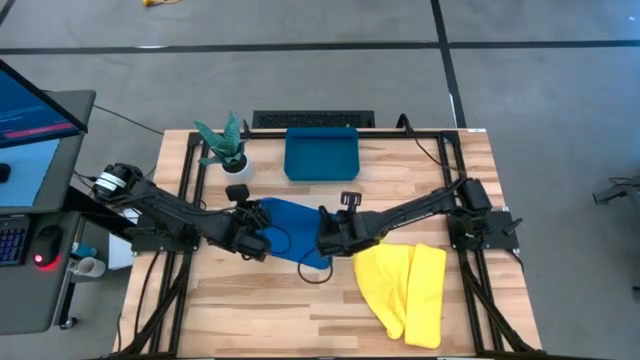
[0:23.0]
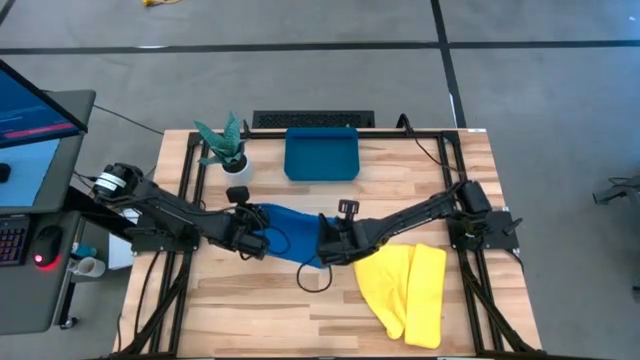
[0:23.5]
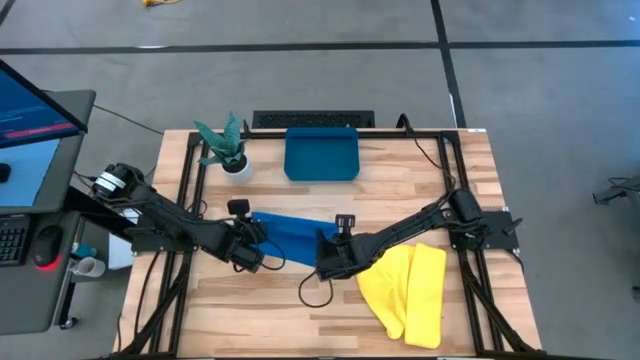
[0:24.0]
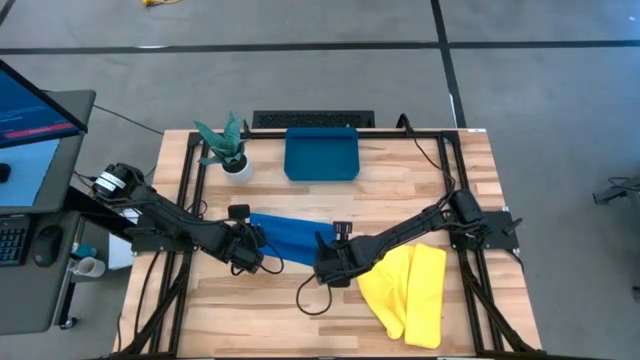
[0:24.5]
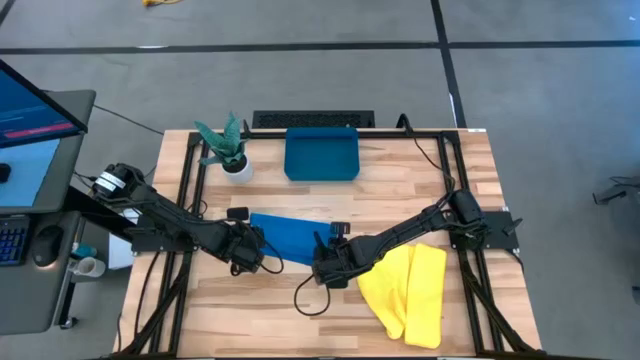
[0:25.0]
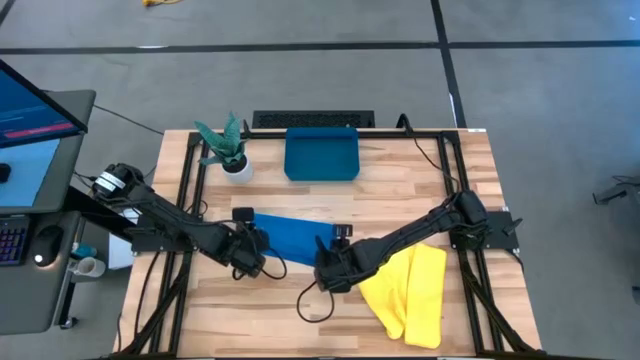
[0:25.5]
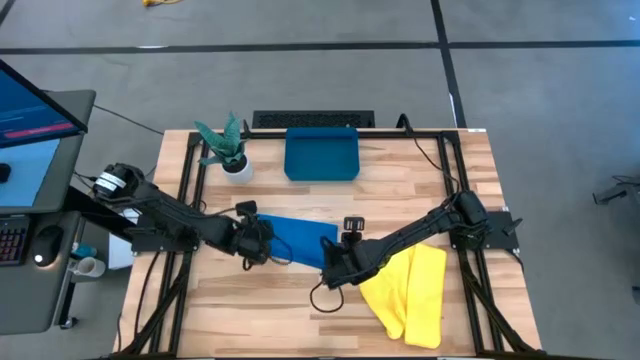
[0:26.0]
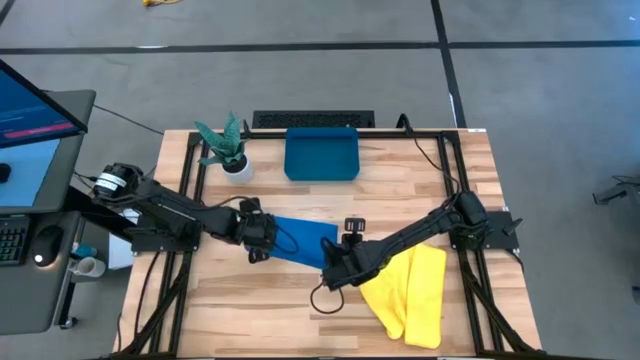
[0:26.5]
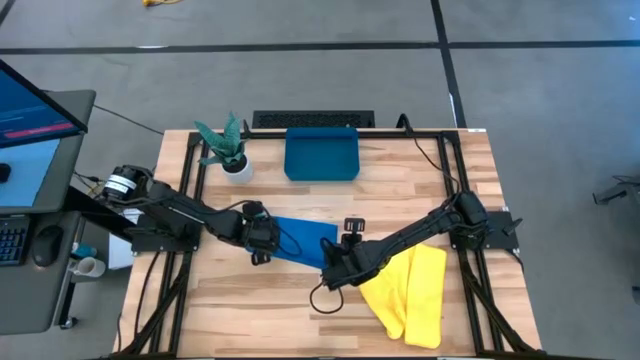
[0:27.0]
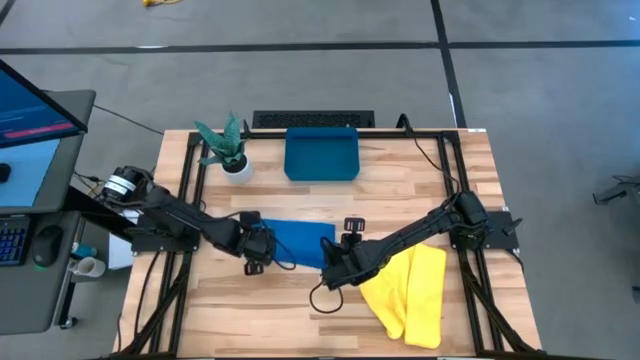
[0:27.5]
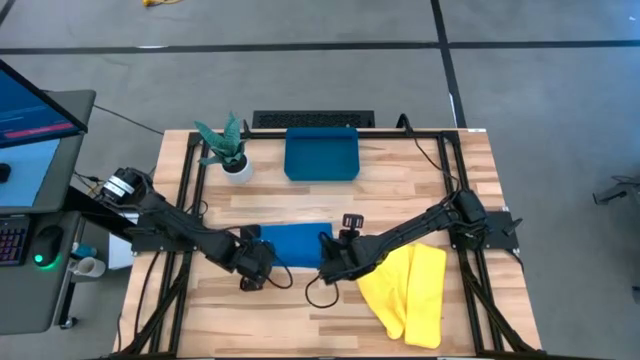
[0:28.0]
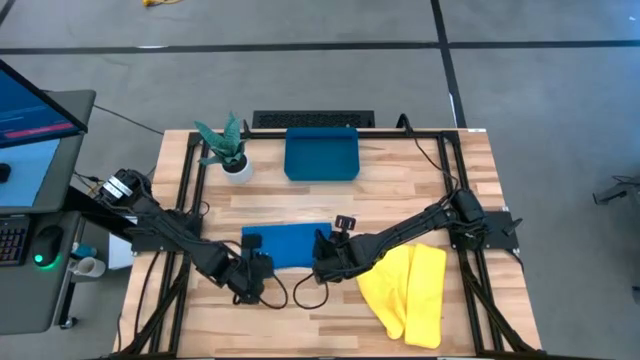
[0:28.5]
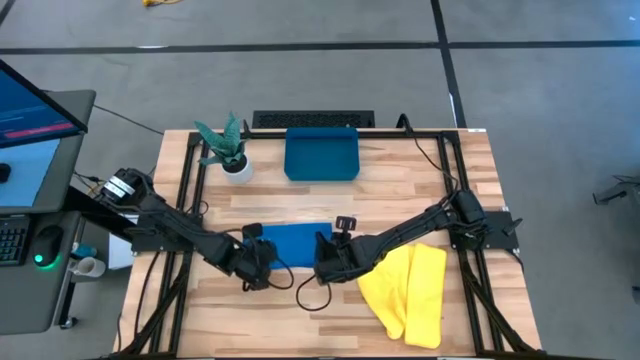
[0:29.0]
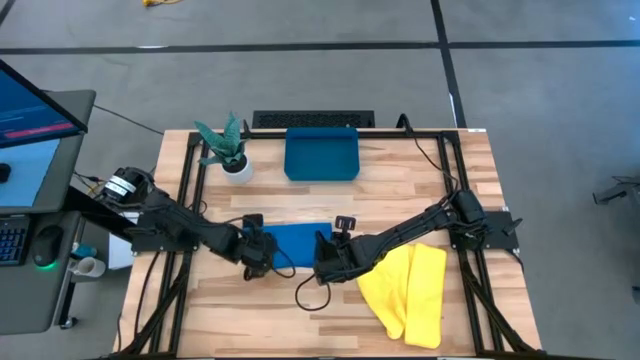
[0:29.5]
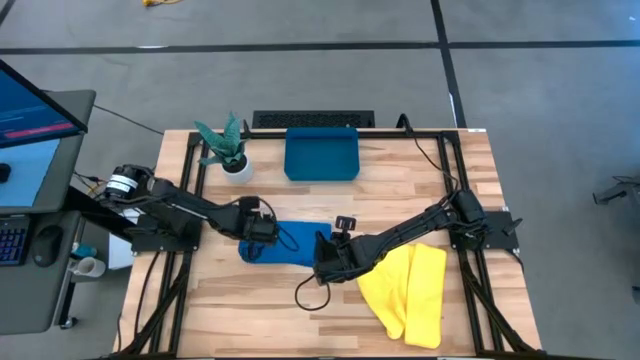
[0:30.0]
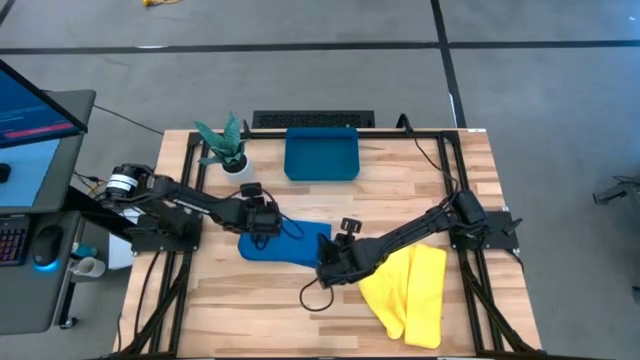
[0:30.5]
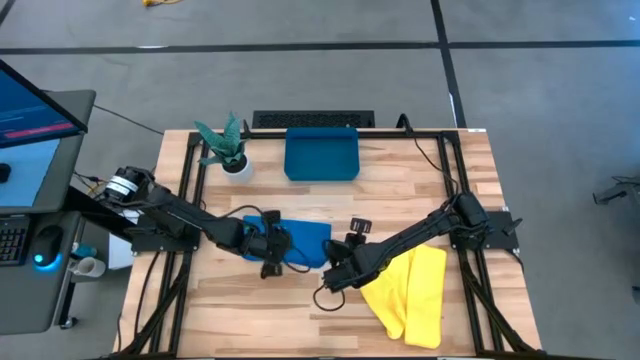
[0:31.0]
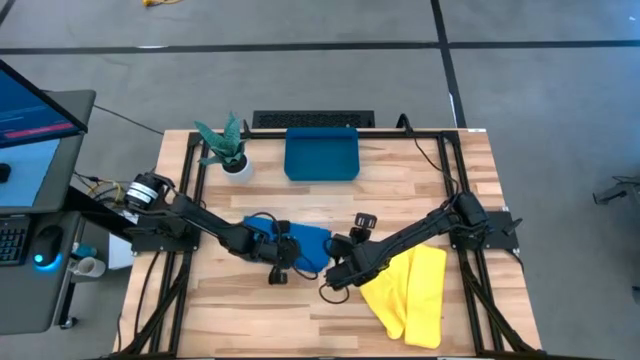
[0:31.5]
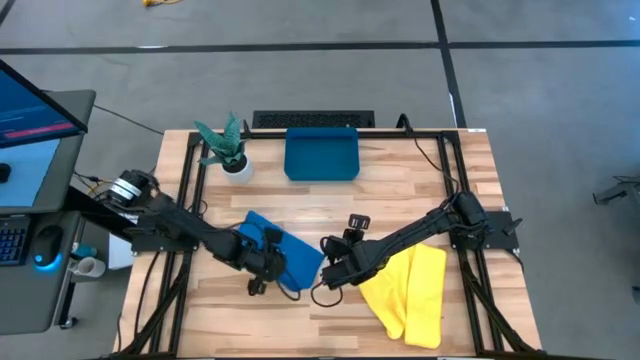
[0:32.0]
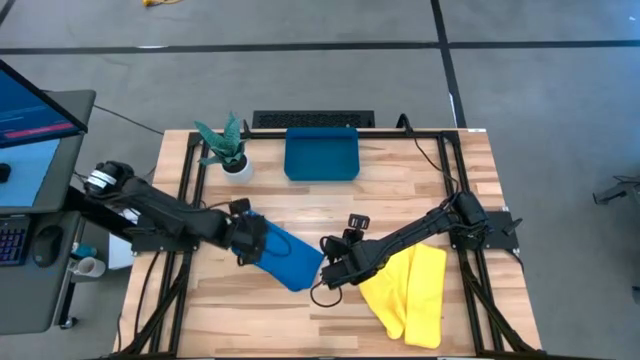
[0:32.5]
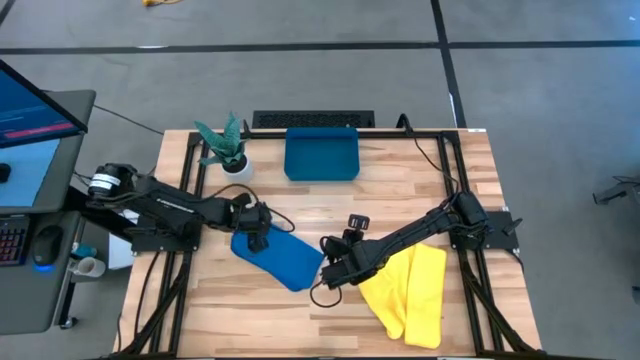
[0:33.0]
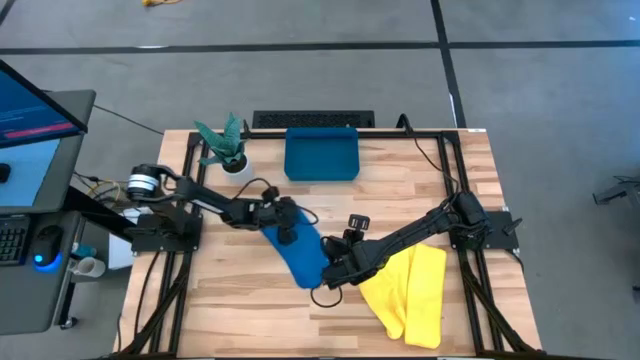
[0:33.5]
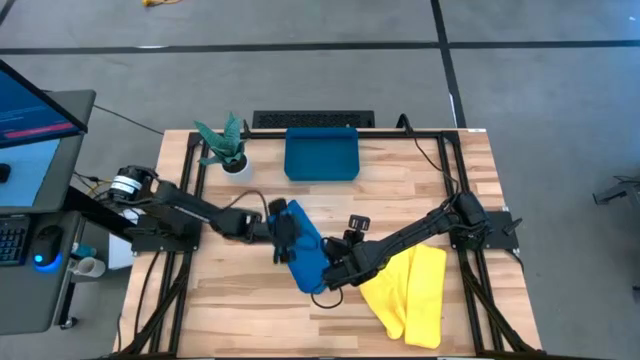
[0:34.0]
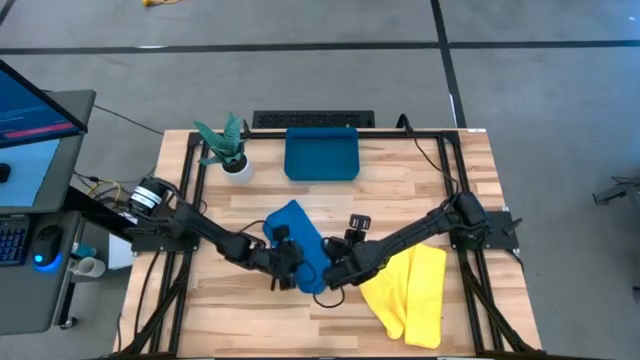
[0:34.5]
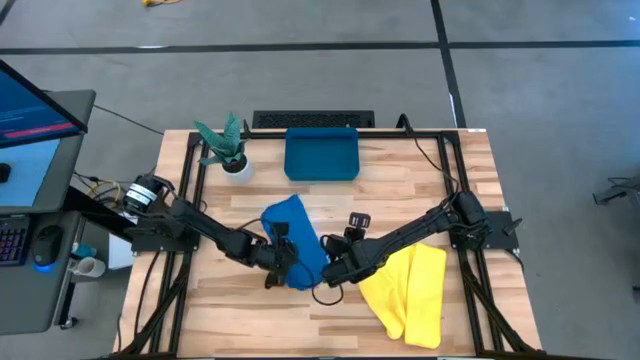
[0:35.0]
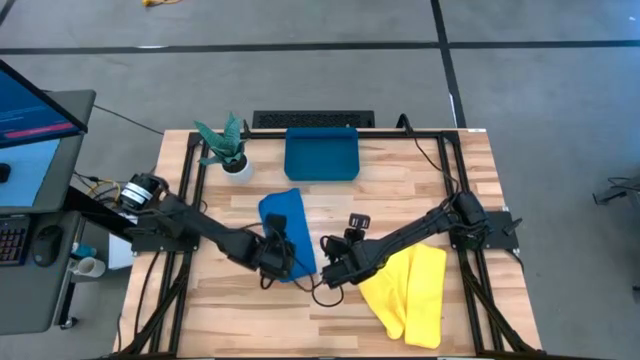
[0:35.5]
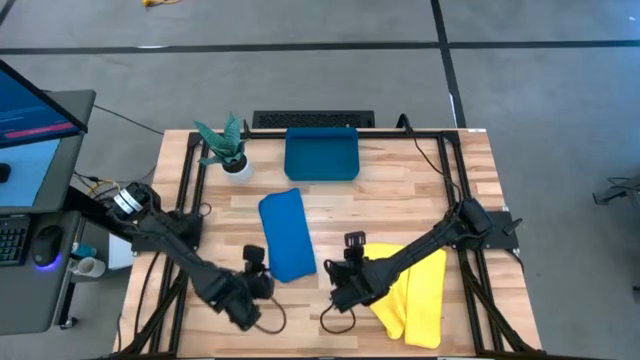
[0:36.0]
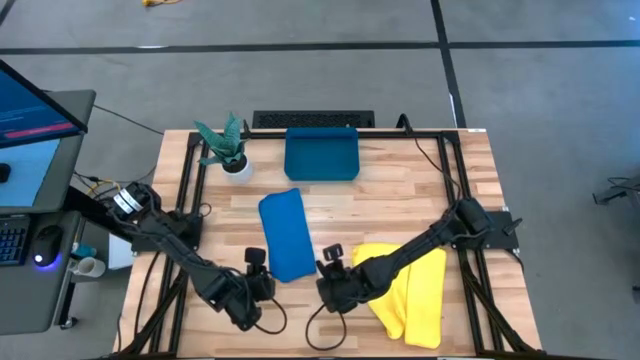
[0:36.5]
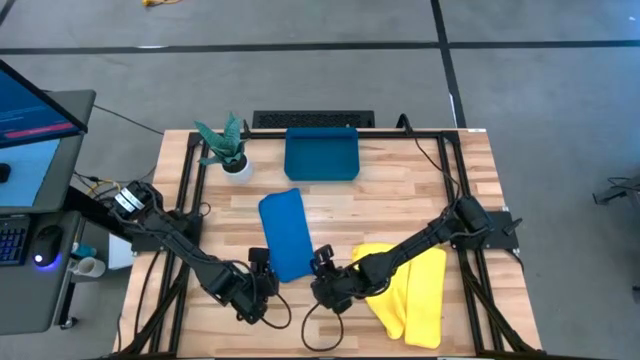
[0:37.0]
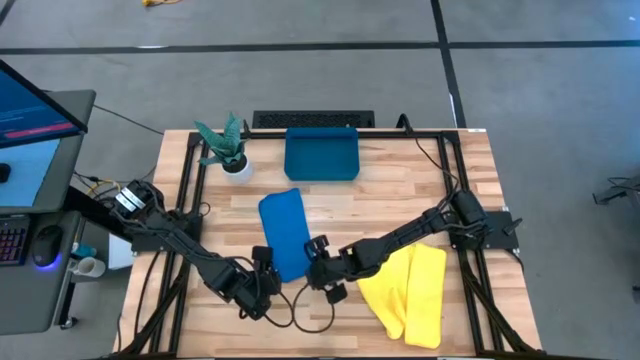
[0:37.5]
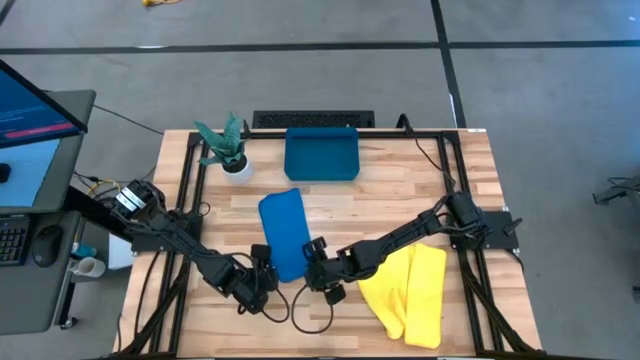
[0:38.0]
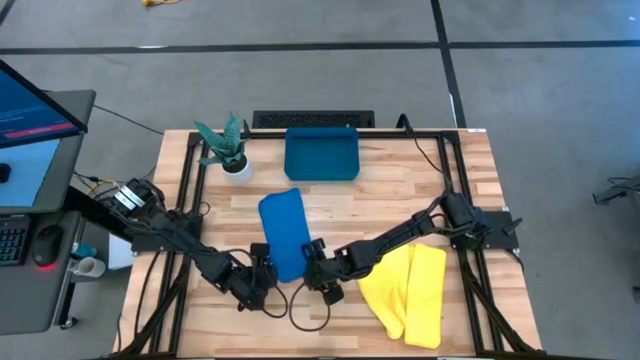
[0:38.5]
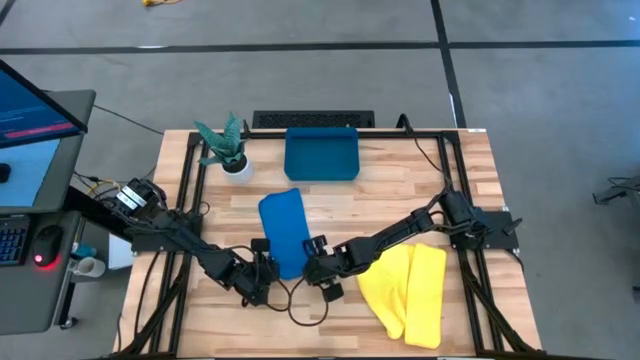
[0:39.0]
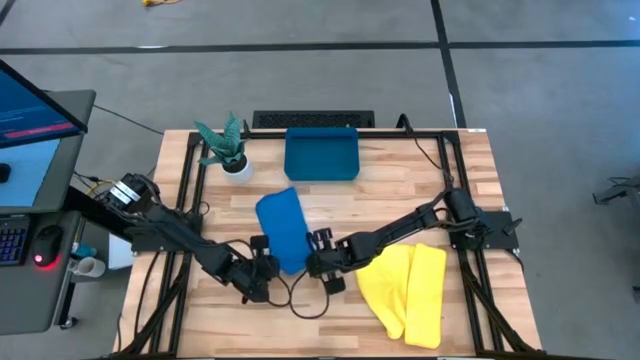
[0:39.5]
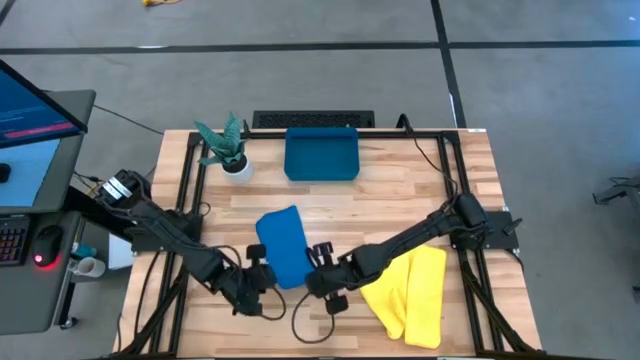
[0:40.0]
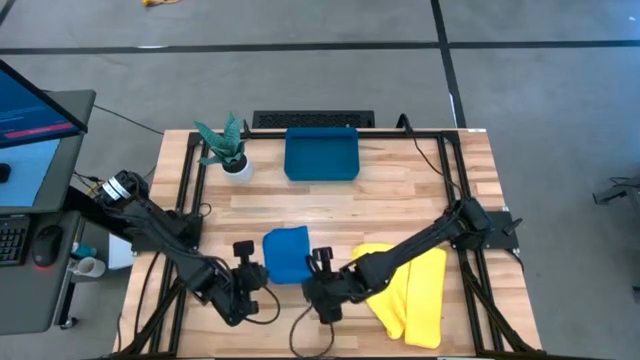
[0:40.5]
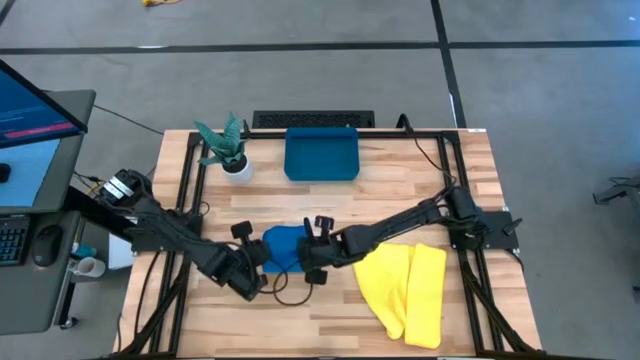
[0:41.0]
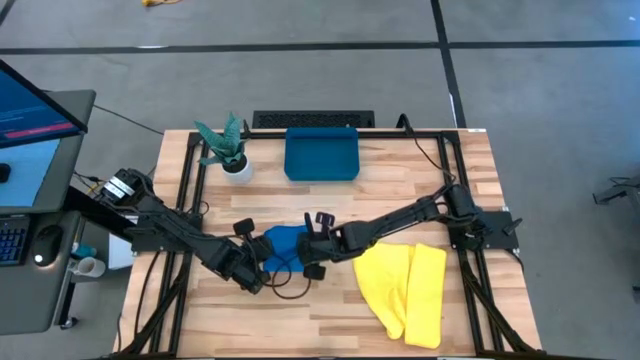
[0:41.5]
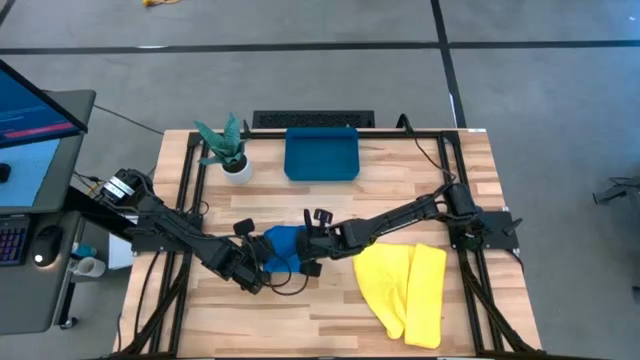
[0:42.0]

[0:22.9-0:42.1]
Task: Roll microfiber towels into tight, uniform cylinder then place into a basket
Fold the blue microfiber towel
